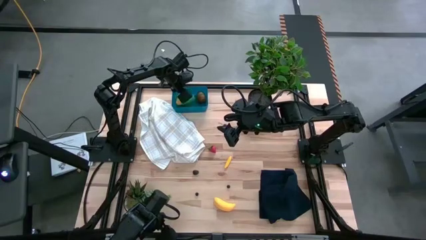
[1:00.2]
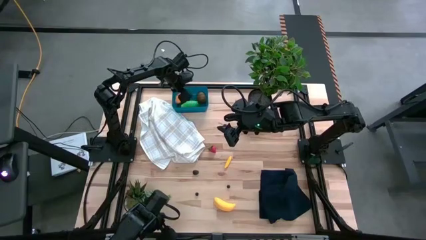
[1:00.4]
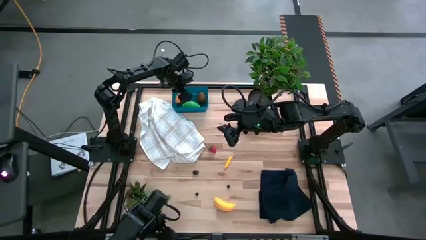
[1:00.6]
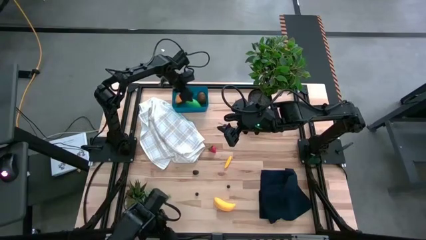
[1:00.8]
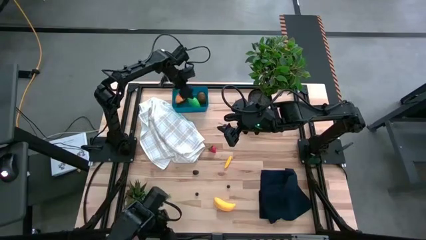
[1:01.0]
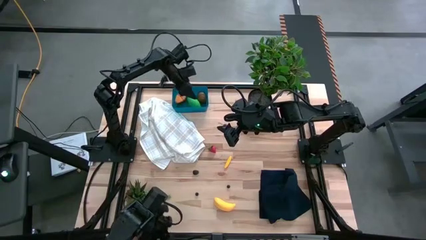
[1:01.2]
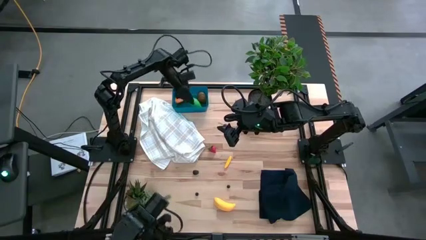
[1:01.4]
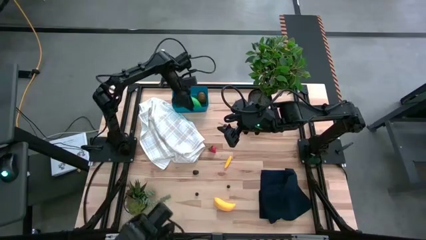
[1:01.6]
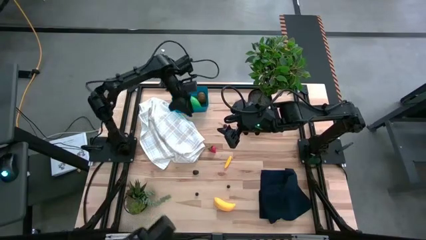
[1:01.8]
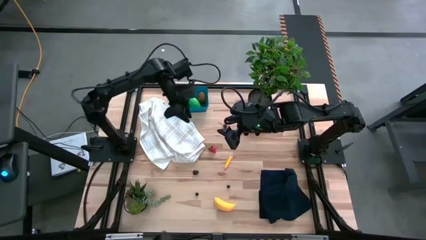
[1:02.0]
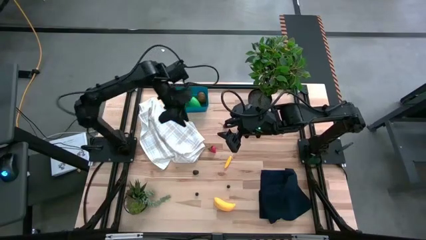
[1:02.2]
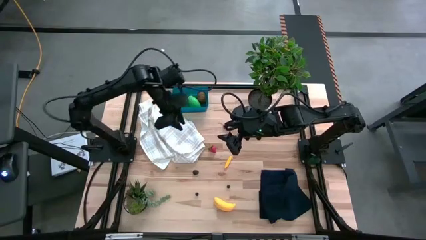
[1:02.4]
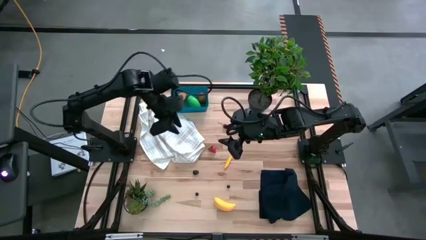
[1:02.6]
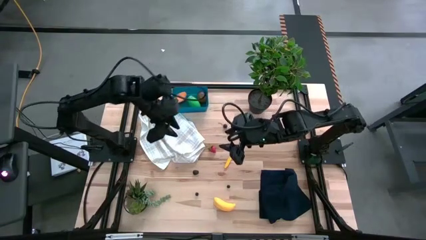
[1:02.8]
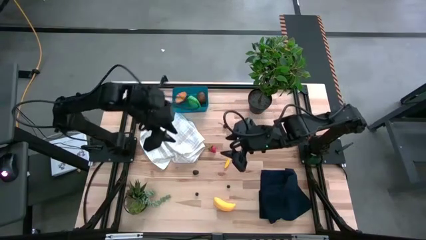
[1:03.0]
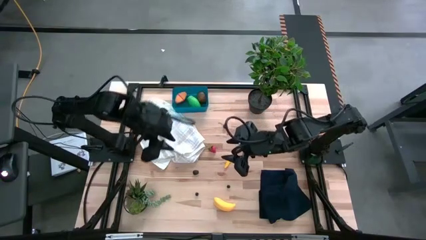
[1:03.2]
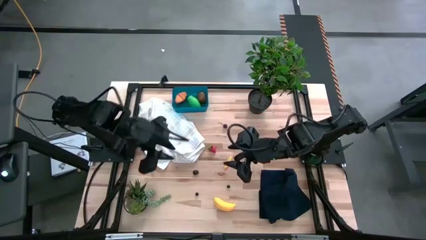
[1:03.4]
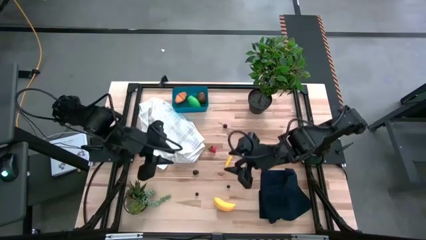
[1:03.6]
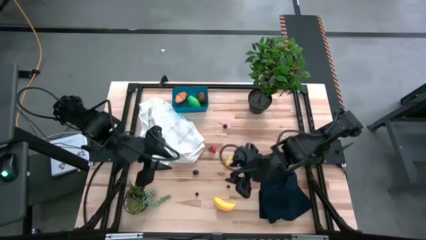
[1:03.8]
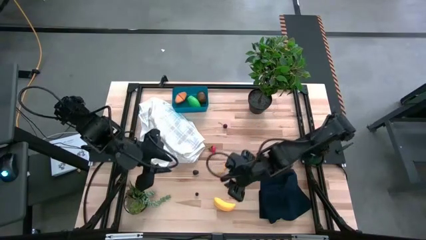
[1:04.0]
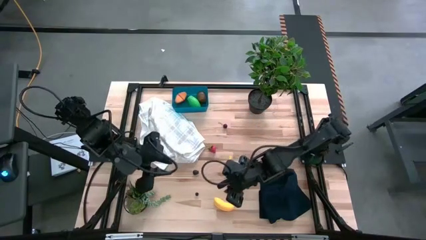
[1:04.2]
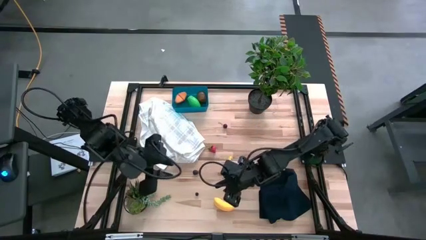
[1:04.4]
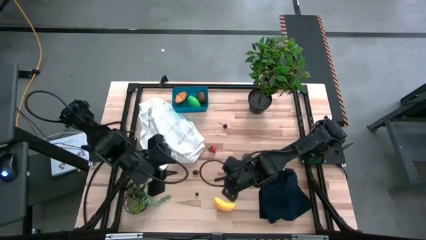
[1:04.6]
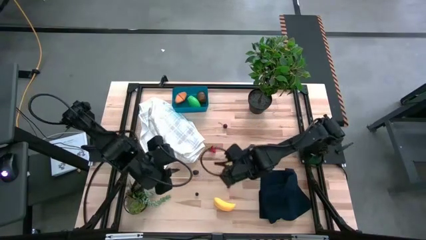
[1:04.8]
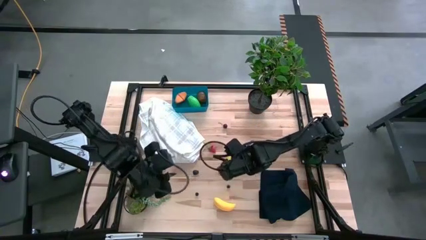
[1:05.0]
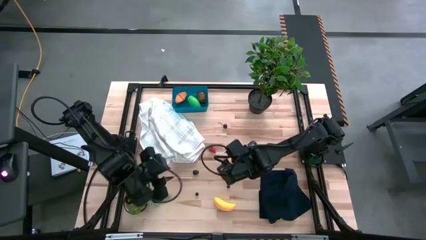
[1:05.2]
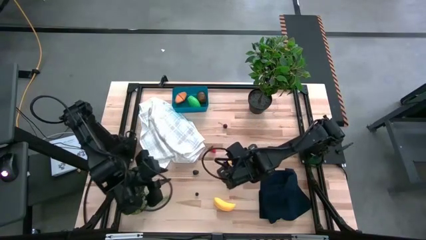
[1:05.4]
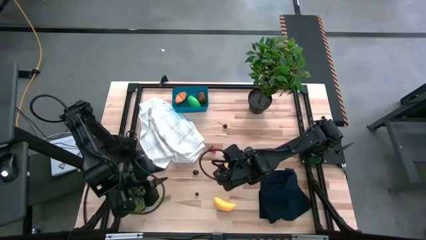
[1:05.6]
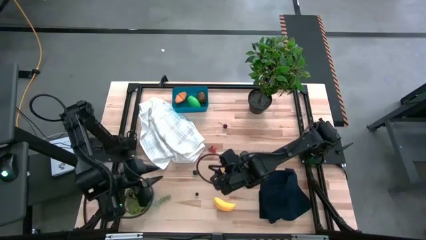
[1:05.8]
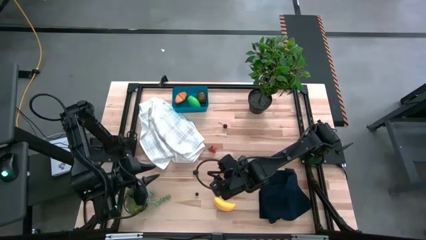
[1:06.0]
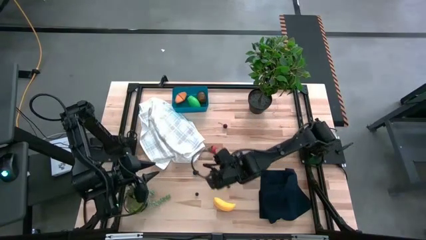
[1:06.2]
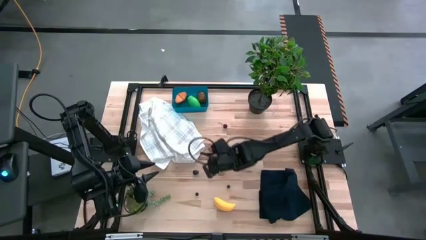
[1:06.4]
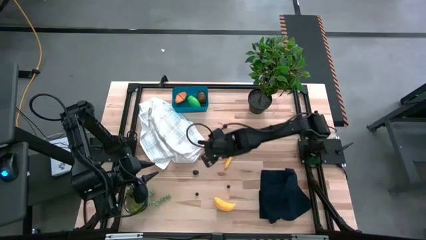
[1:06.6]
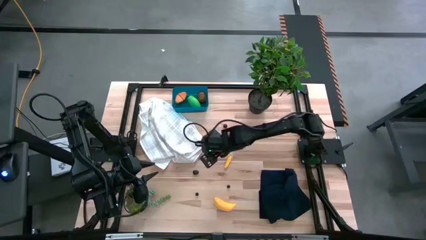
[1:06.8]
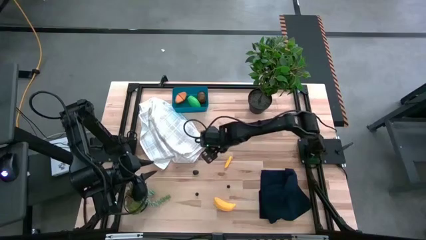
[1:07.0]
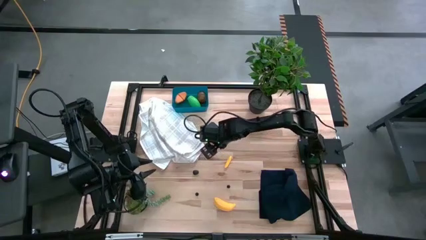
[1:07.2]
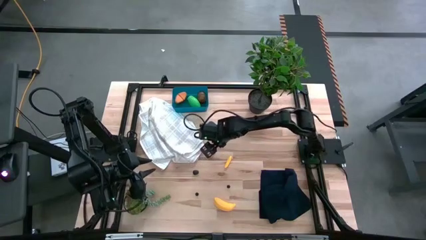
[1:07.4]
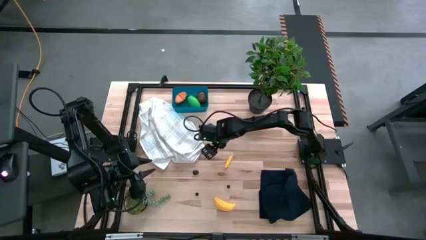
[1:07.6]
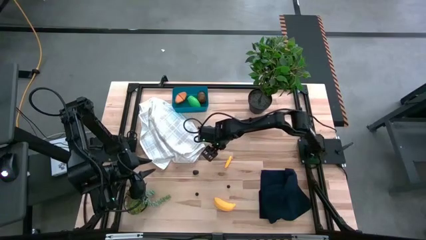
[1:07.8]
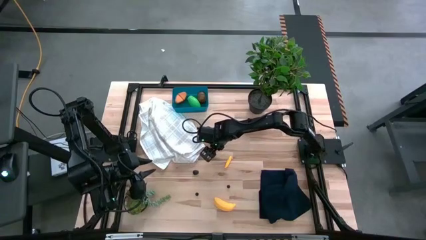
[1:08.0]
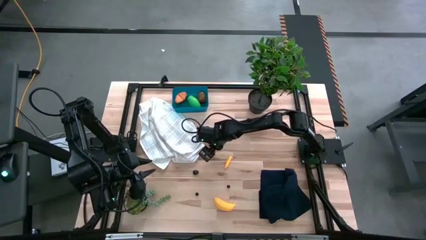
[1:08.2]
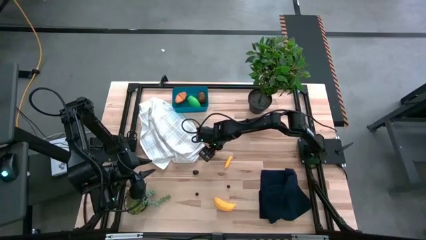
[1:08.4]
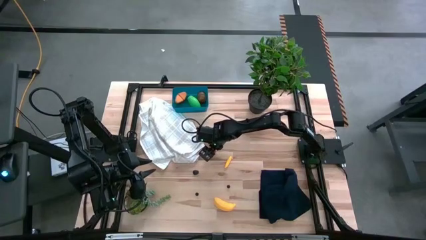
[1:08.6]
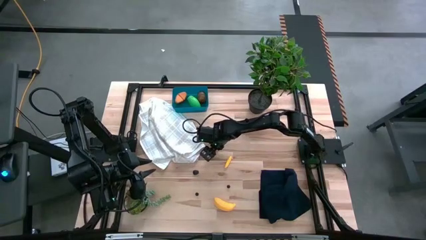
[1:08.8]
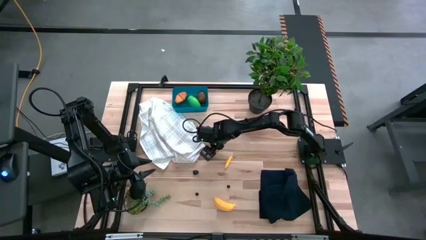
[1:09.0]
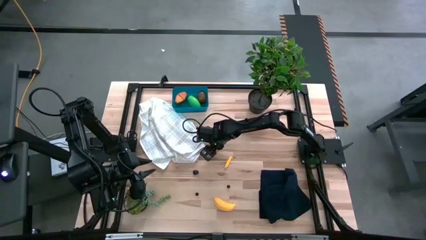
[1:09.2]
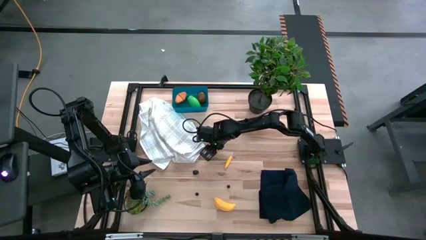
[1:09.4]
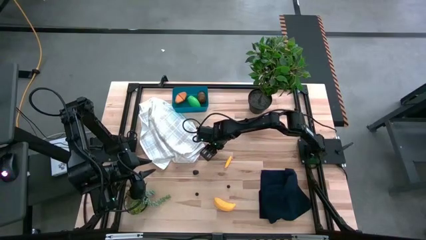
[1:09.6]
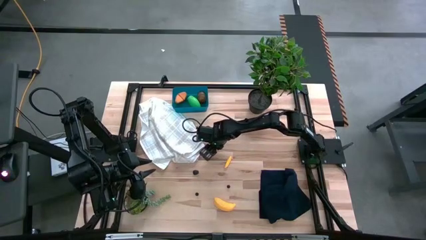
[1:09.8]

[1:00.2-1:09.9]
Task: Pick and placing Produce into tupperware
Put the red strawberry into the blue bin

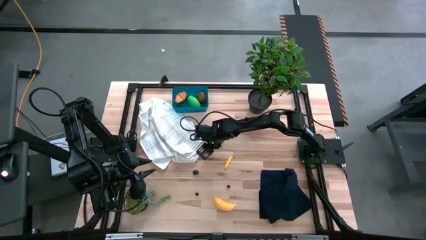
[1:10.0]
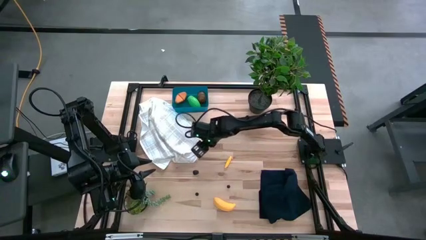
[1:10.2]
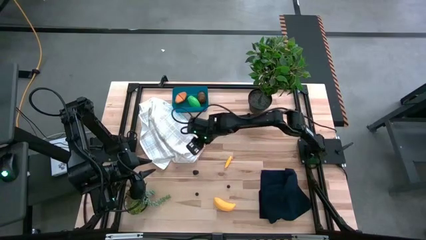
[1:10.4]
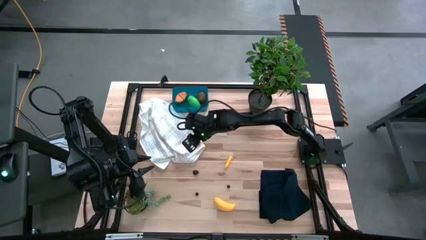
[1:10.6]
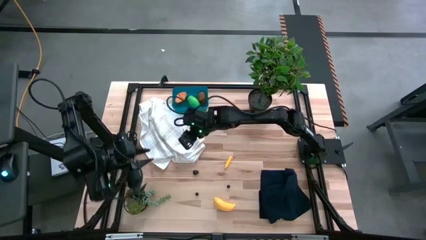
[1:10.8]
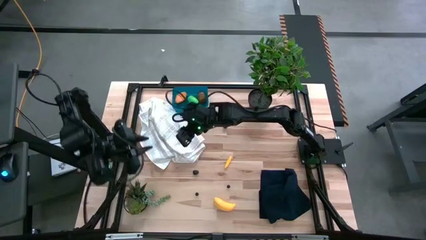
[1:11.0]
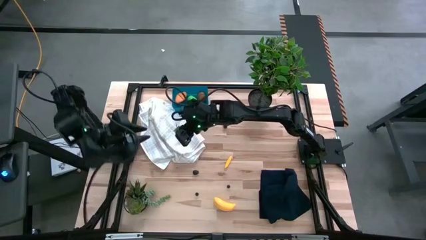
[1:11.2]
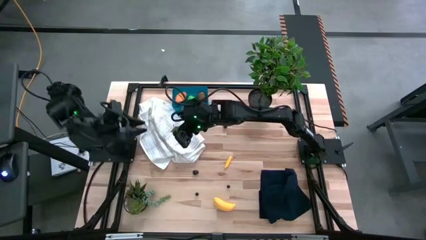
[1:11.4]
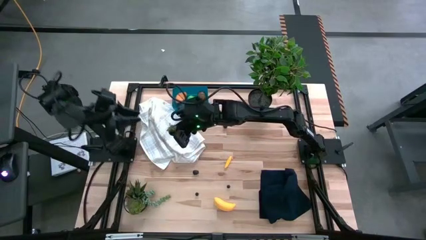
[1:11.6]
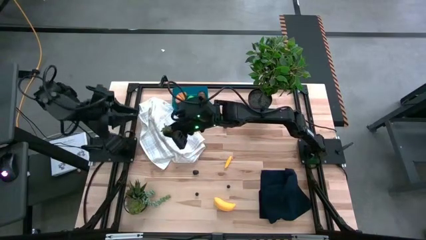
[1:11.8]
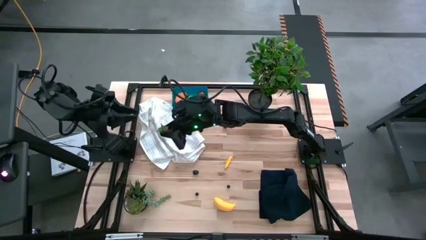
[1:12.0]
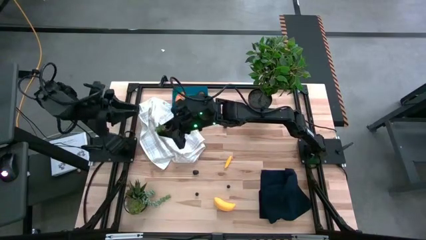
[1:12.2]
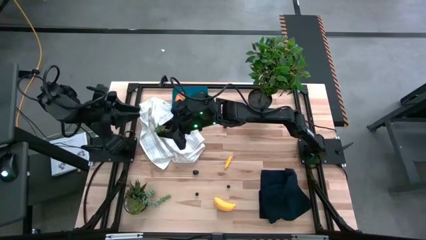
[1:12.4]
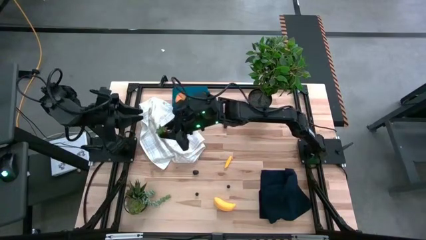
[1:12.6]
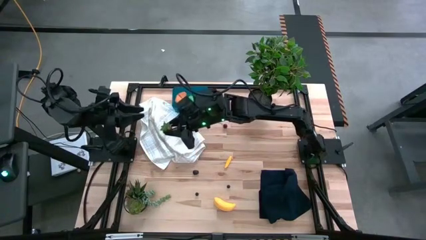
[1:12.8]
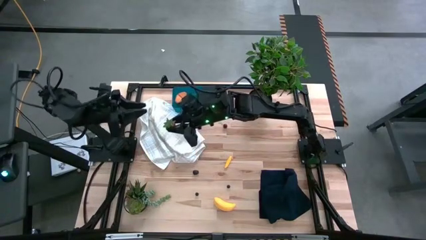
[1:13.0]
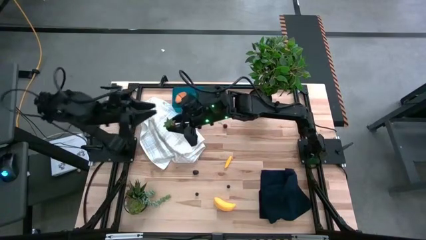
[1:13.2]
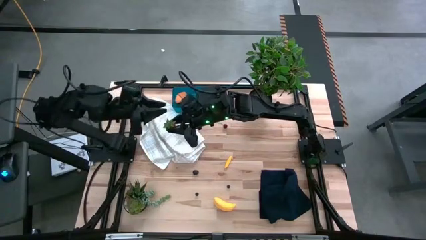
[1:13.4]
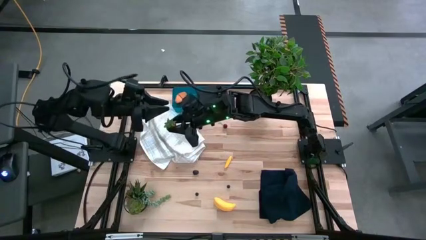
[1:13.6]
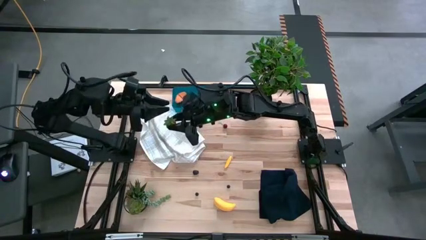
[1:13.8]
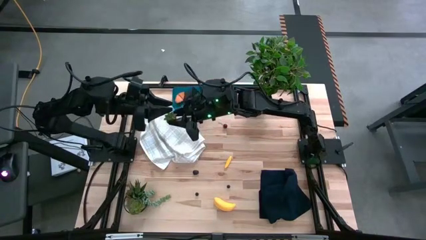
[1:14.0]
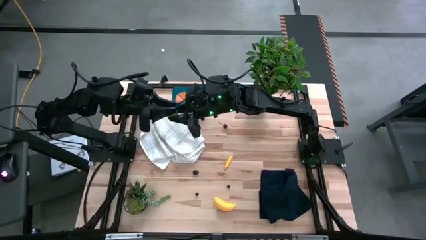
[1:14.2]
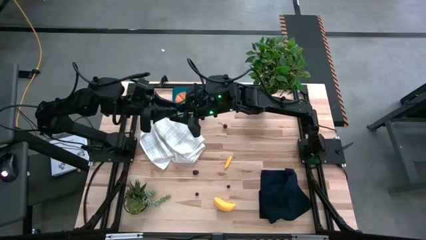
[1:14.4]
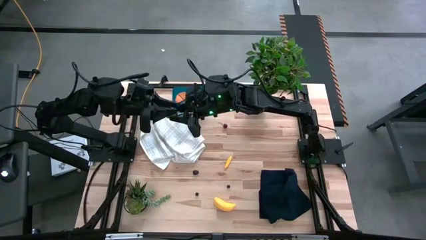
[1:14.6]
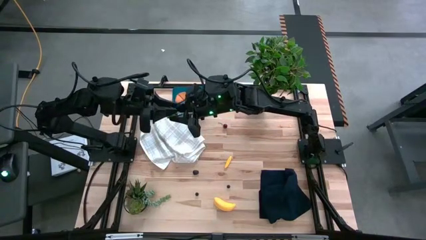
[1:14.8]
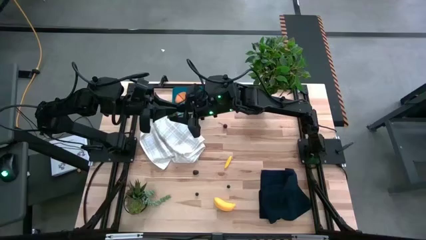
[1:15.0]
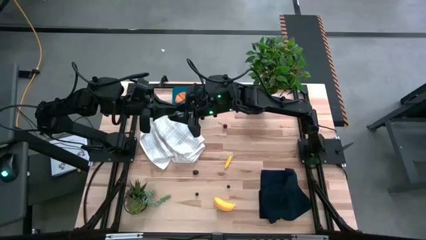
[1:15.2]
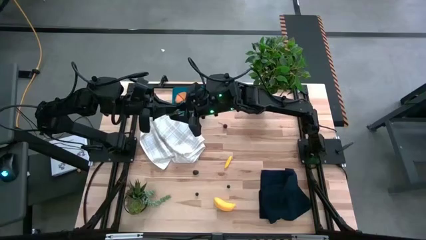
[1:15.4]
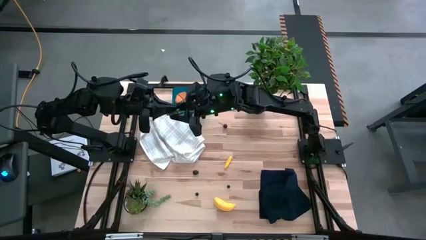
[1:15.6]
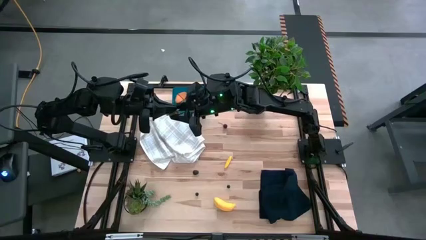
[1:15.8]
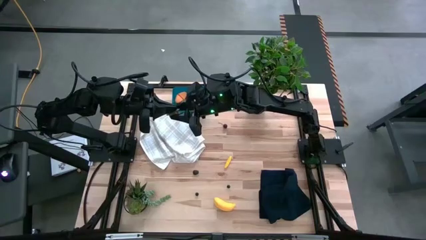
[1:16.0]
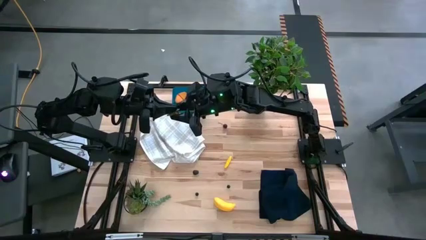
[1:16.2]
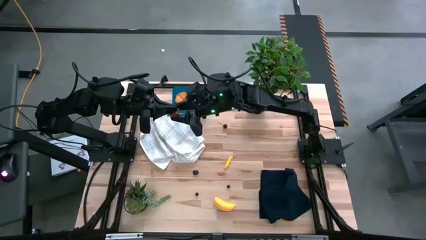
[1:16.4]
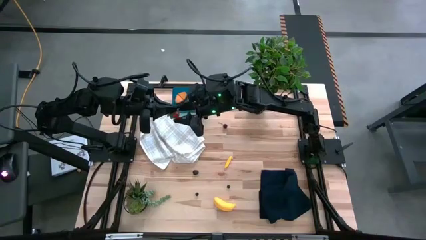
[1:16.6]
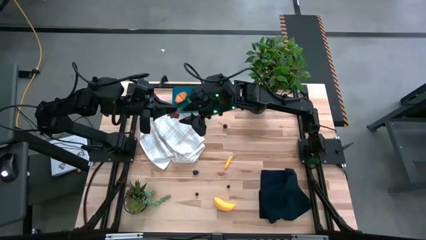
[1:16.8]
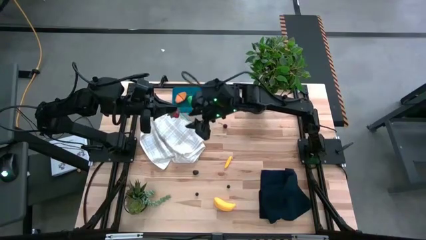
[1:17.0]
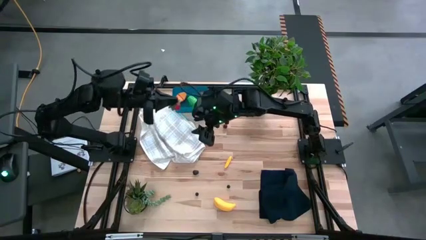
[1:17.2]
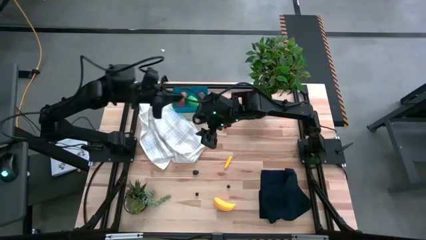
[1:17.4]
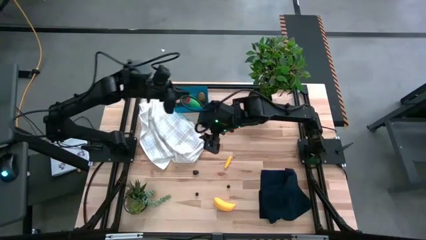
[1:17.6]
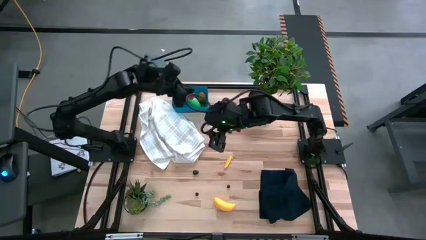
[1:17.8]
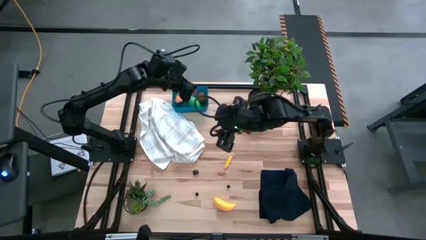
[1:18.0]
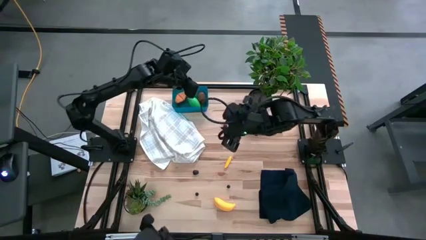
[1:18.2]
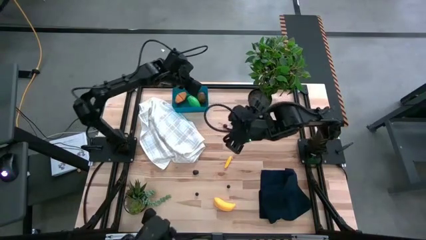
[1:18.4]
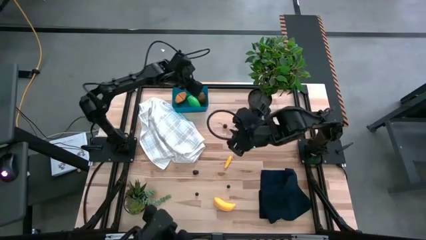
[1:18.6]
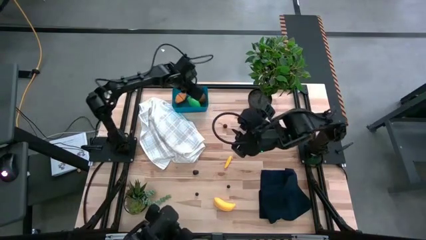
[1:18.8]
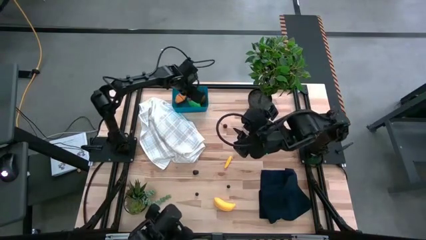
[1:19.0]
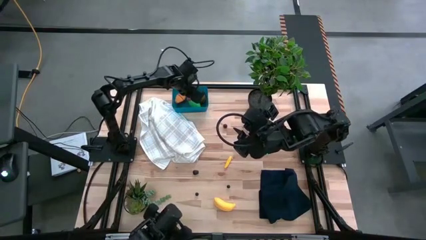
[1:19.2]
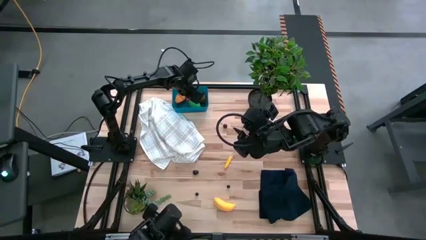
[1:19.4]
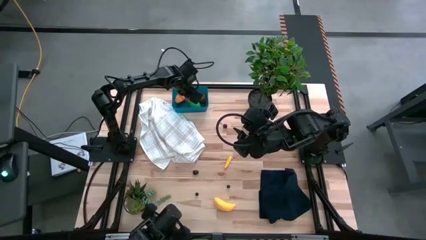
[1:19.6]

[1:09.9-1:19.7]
Put the red strawberry into the blue bin
